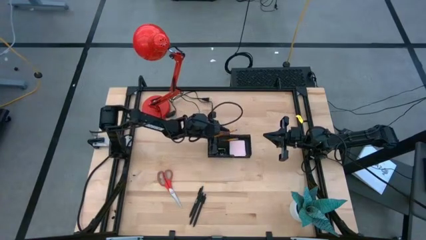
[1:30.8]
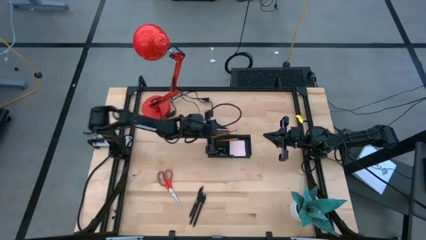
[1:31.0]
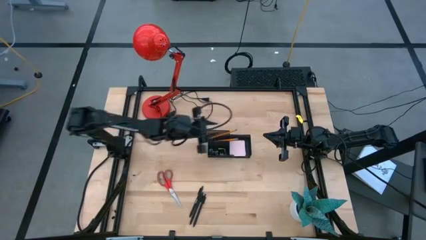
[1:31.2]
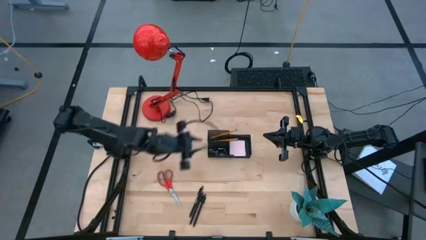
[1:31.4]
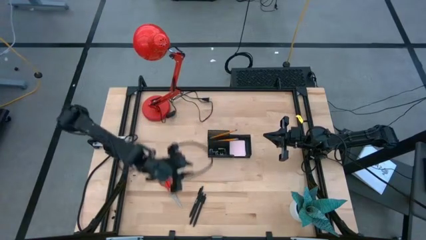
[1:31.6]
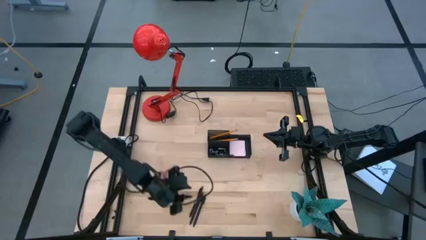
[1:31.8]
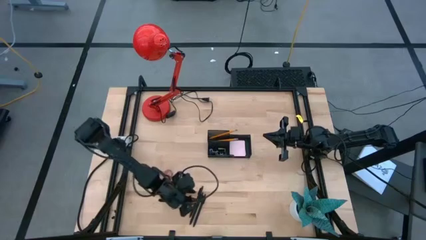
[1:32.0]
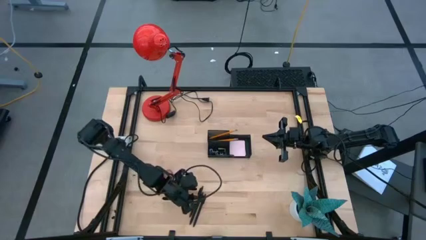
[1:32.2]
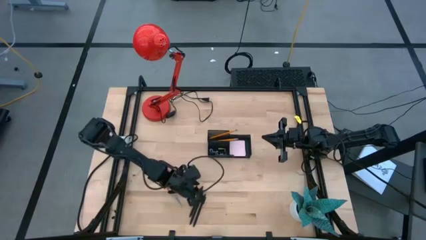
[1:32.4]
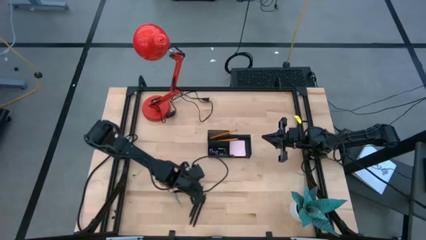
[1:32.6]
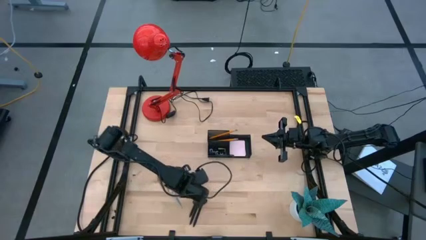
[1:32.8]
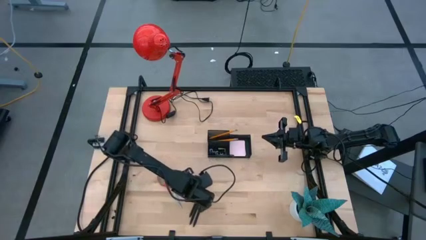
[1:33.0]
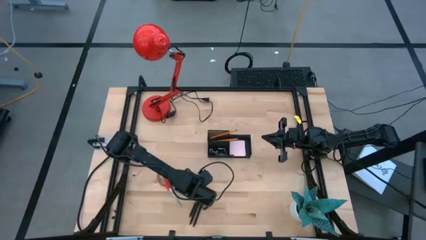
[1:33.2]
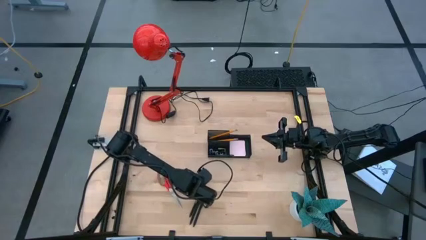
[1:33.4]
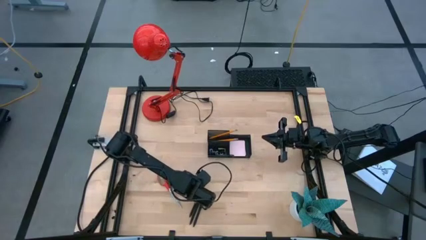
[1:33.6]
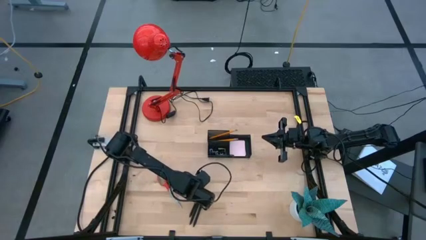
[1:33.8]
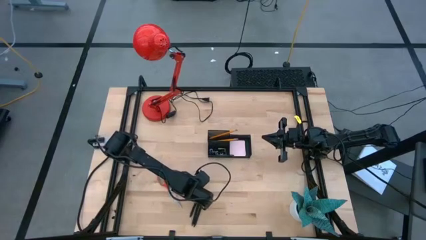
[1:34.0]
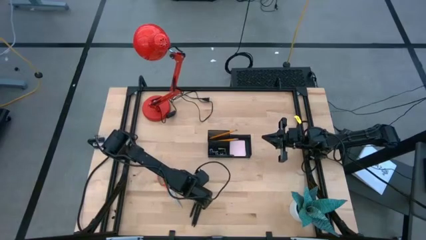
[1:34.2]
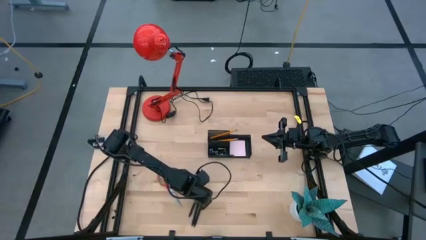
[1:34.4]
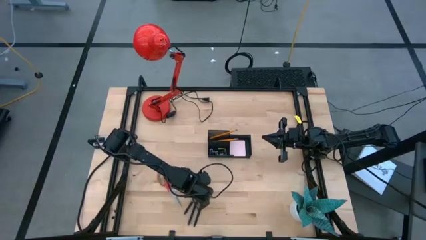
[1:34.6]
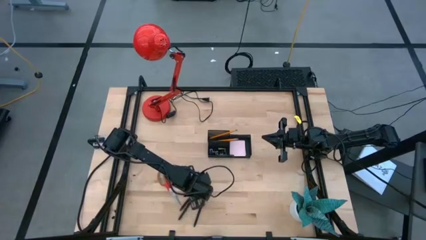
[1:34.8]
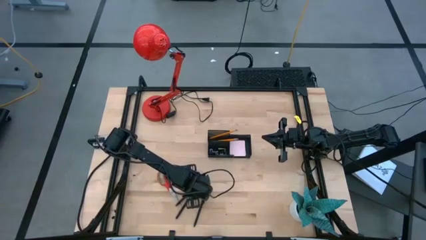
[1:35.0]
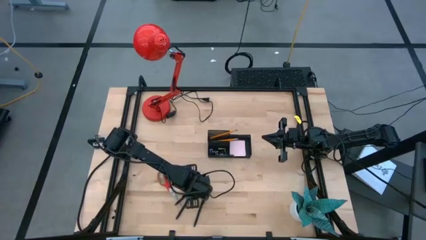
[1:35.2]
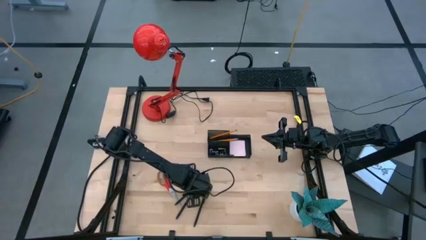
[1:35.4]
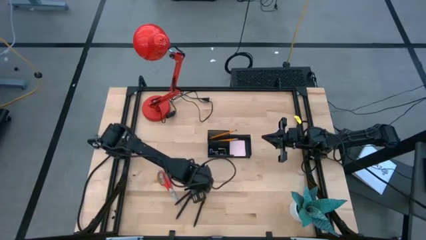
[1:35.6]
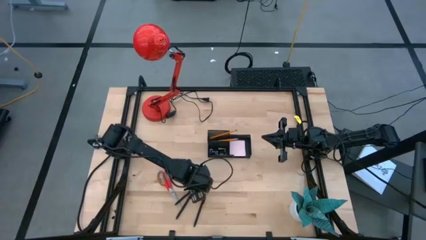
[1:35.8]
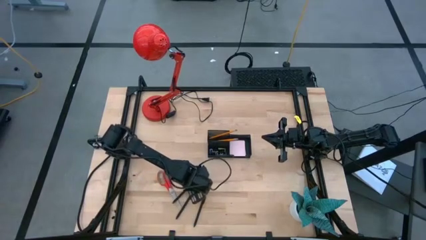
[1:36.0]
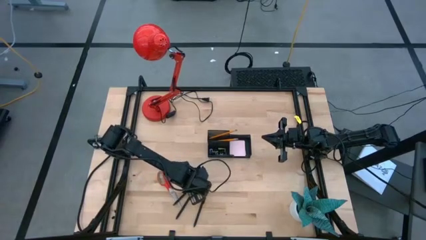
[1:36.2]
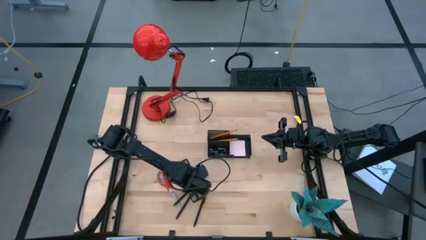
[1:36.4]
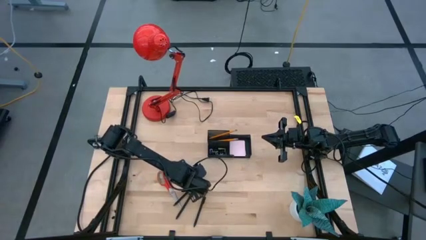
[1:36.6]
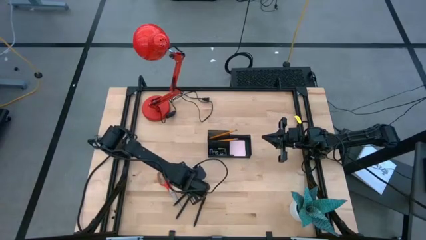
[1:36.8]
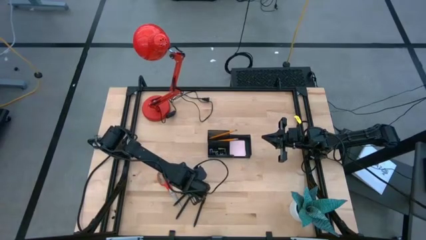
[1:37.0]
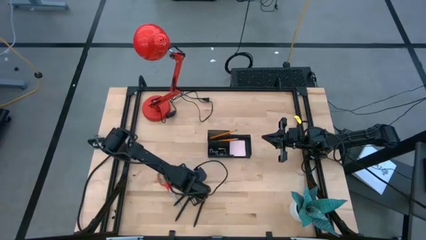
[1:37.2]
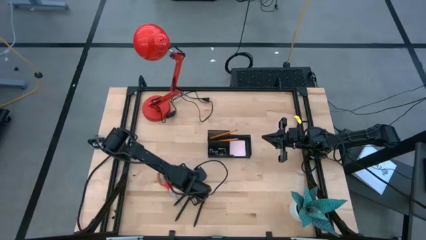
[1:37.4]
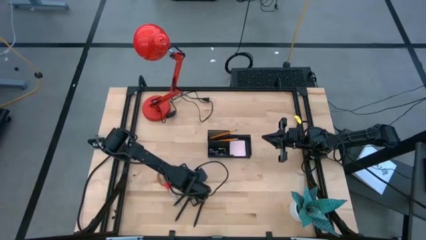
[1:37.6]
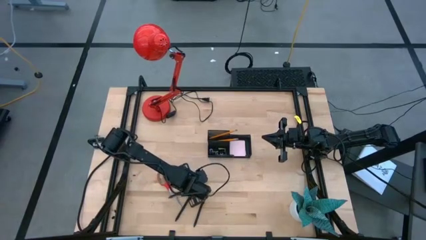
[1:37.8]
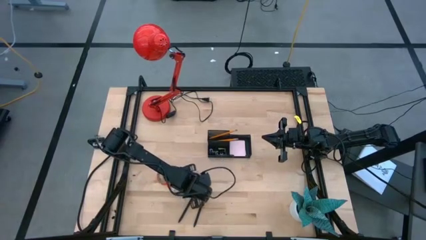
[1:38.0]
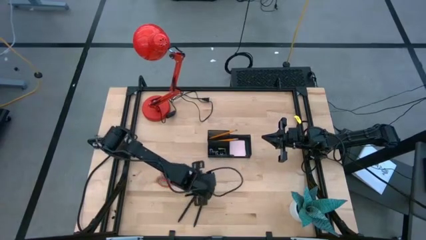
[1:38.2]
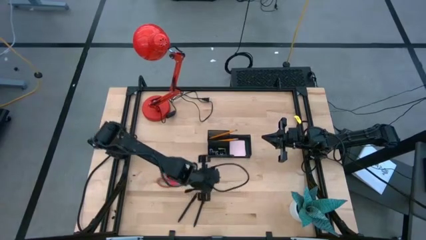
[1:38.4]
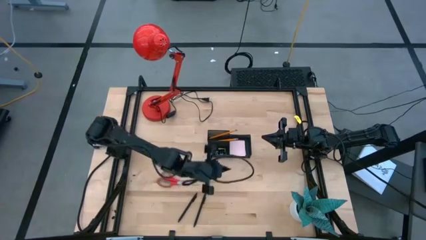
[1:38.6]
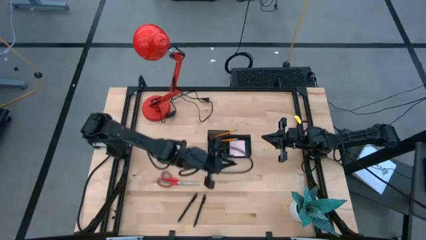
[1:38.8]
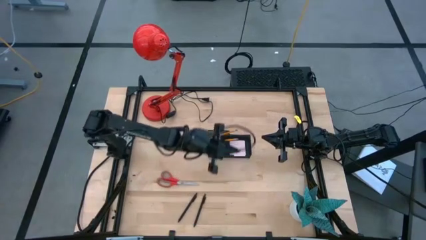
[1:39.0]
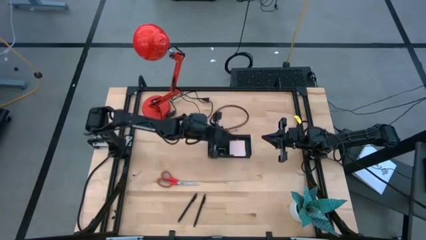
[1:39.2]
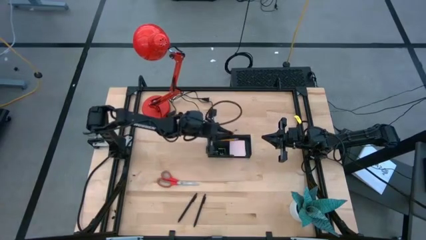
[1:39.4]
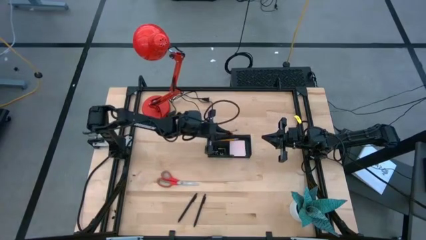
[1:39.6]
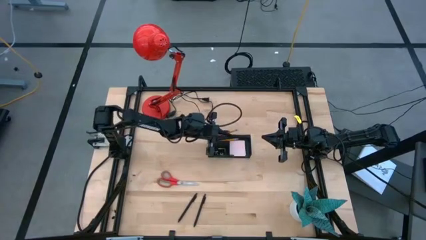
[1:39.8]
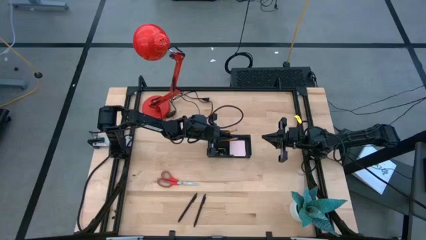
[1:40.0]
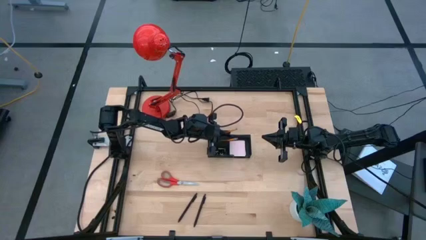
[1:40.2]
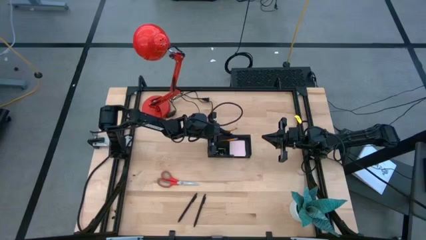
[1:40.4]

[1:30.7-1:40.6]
Task: Pick and place office supplies into organizer
Put the black pen into the black desk organizer

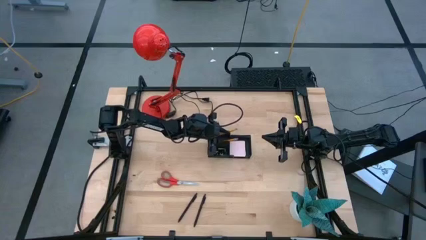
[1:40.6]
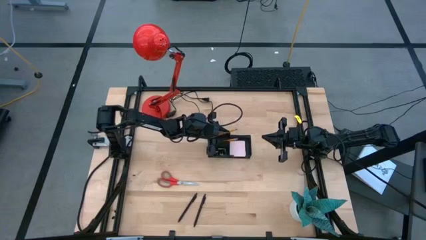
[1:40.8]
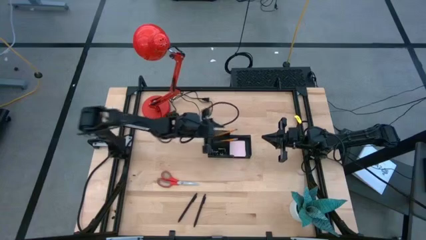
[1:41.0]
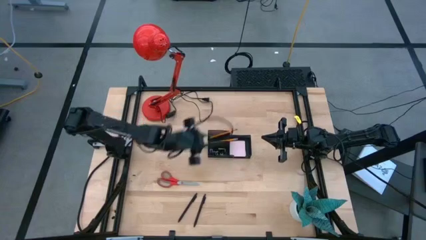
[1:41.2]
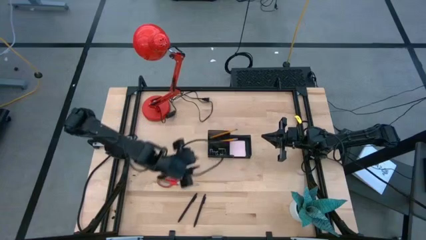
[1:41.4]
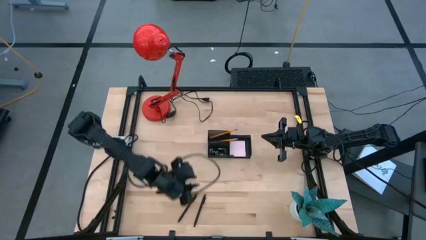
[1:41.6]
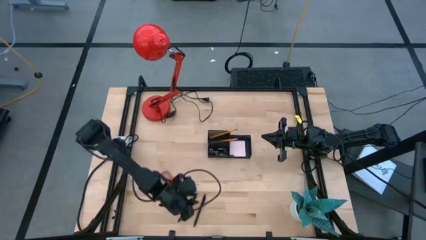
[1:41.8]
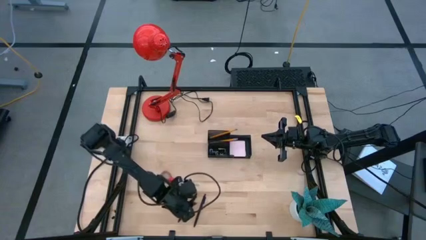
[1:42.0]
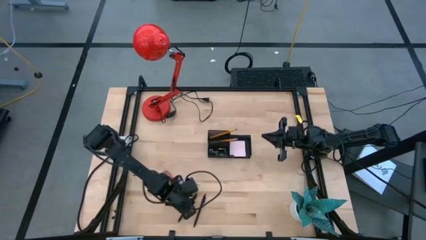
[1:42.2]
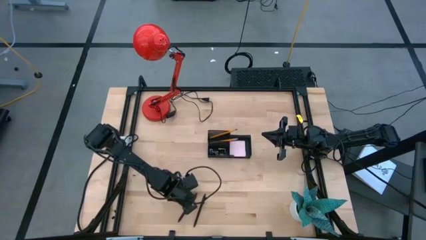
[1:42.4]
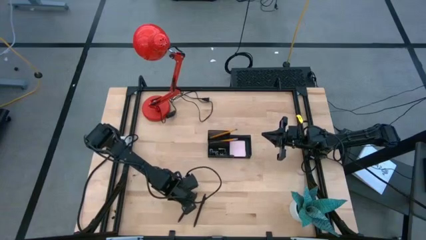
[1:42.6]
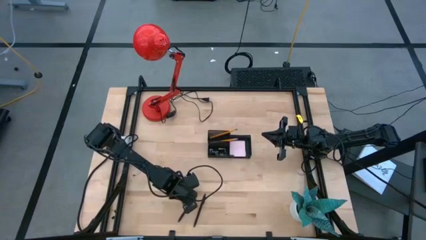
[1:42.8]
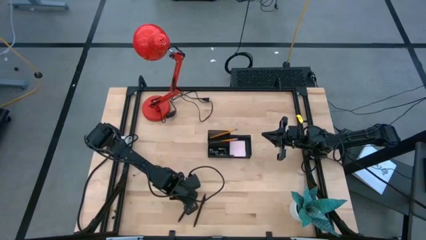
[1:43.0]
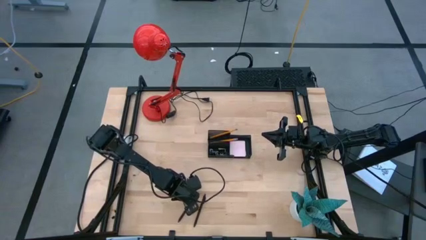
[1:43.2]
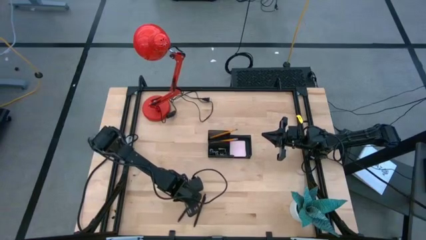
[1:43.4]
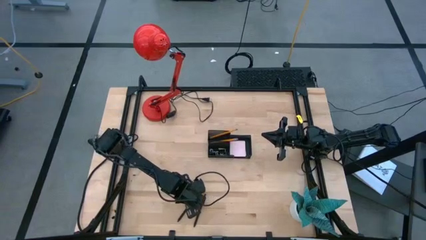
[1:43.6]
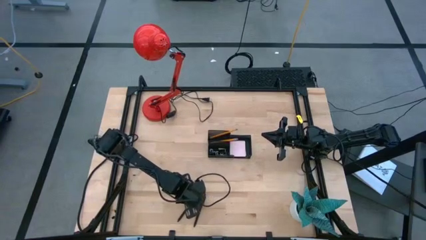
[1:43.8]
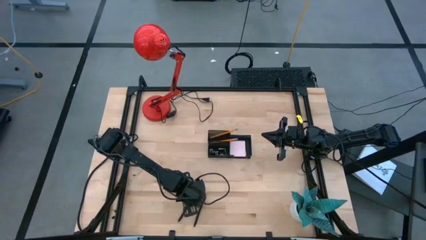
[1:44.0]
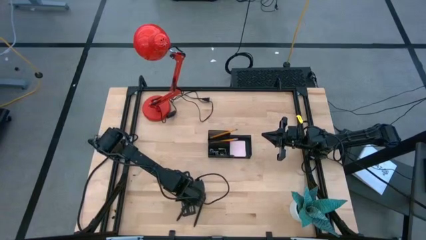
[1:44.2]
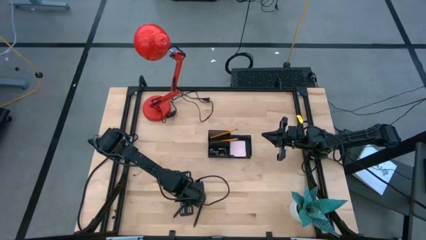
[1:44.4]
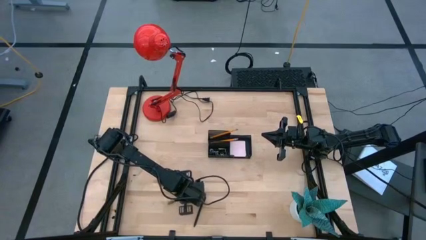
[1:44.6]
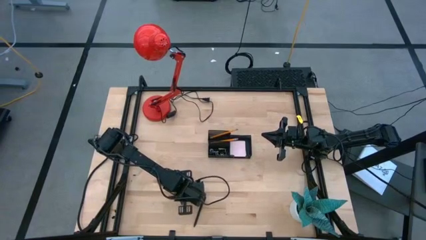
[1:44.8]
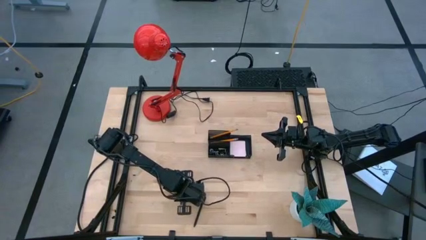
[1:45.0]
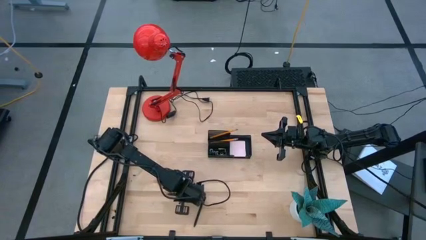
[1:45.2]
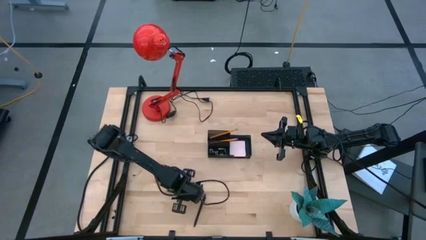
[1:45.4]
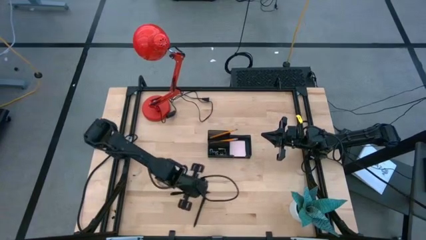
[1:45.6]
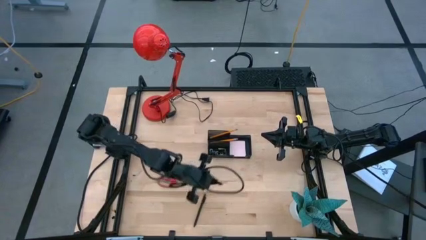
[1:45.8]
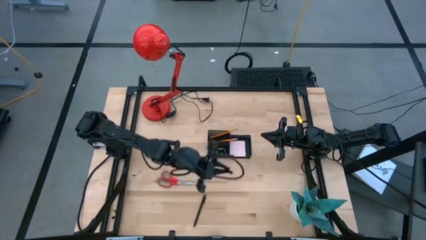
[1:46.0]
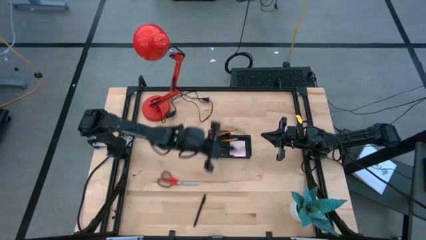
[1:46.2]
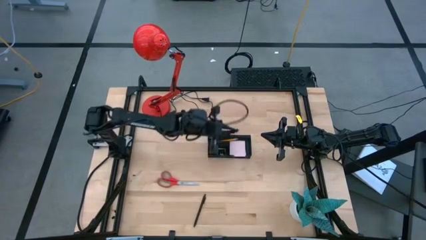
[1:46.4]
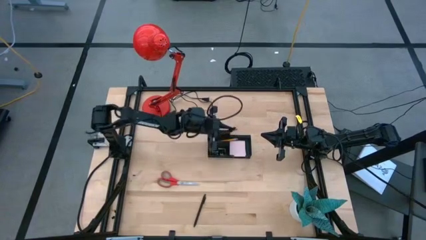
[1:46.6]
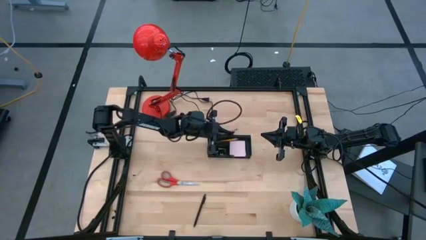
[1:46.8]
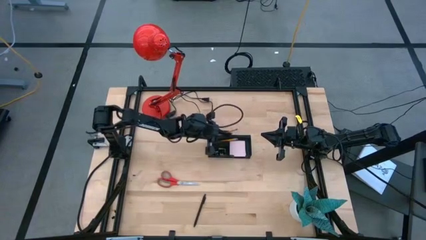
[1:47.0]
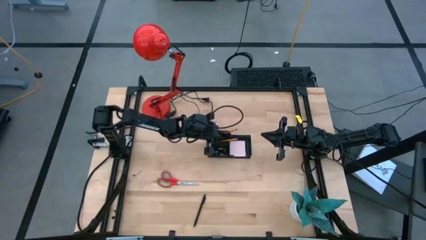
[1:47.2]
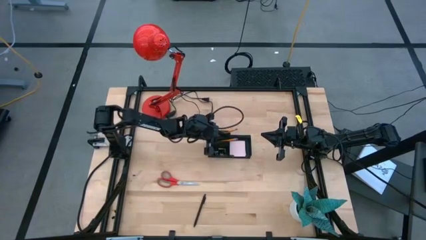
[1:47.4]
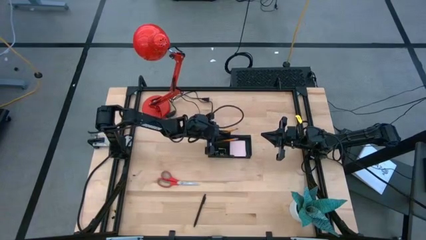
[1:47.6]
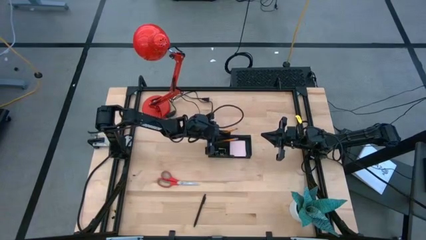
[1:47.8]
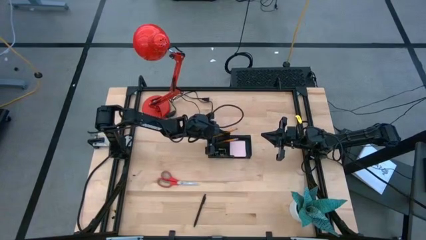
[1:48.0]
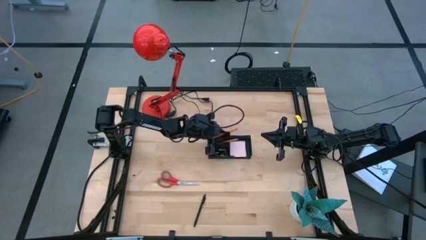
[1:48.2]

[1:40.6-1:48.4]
Put the black pen into the black desk organizer
